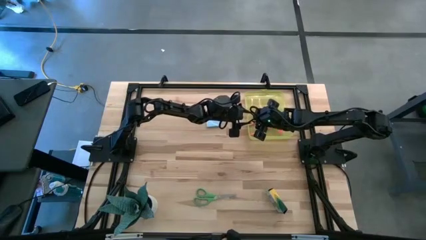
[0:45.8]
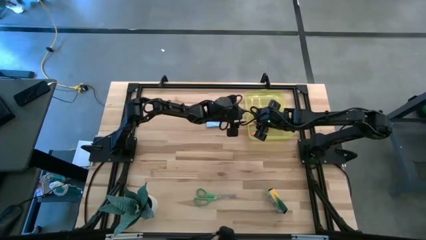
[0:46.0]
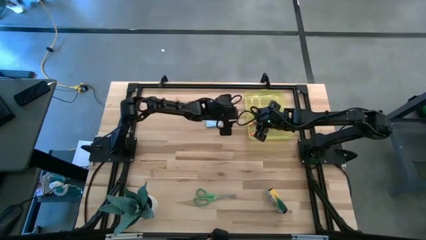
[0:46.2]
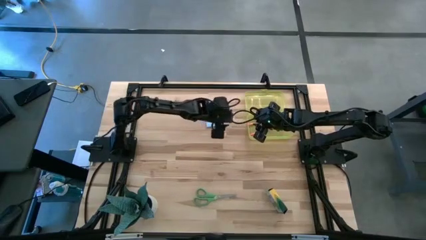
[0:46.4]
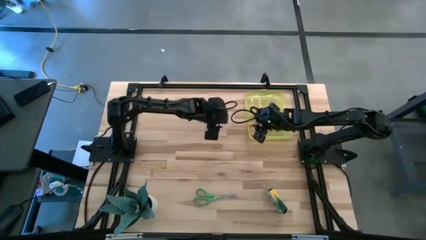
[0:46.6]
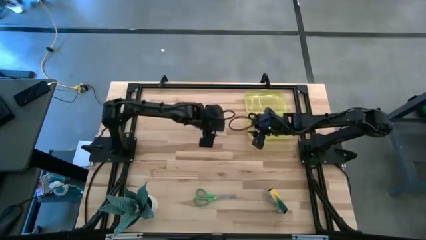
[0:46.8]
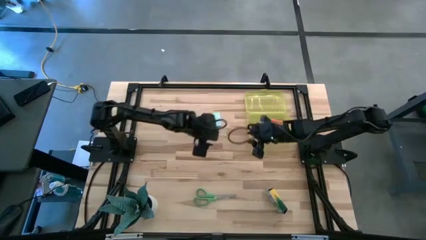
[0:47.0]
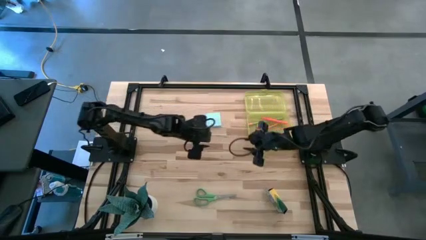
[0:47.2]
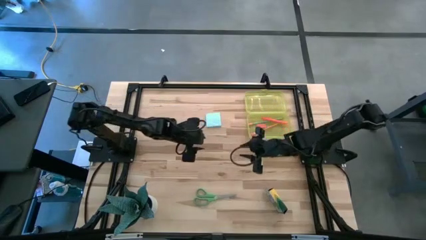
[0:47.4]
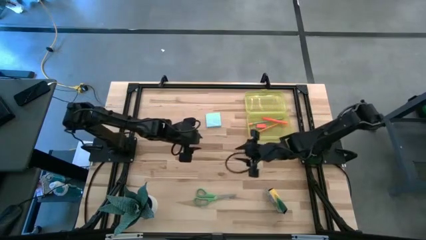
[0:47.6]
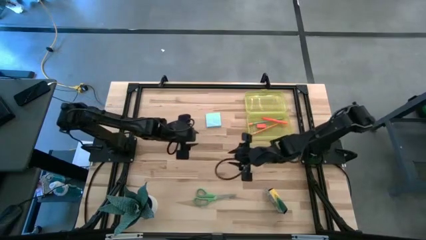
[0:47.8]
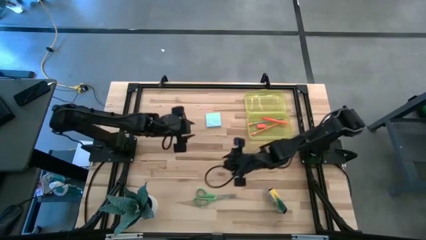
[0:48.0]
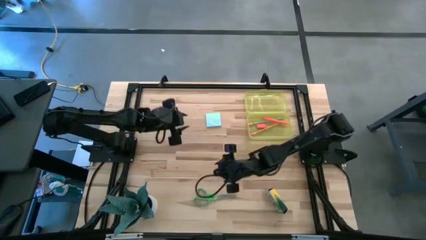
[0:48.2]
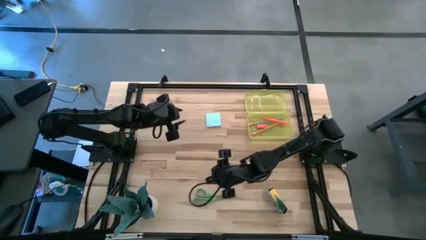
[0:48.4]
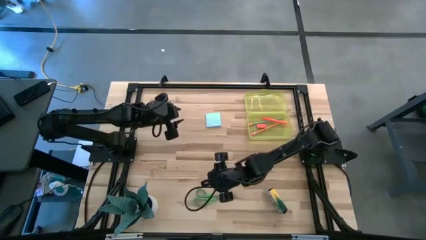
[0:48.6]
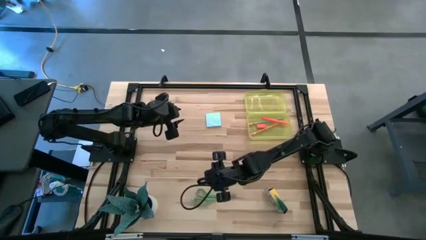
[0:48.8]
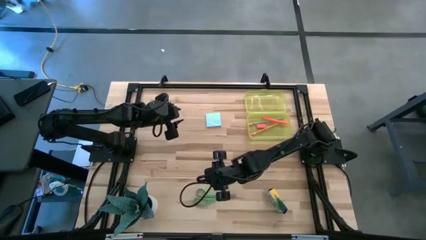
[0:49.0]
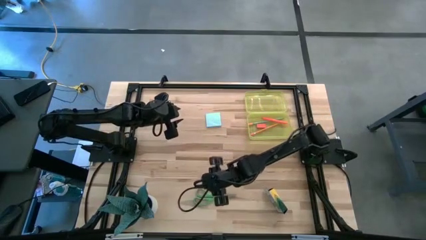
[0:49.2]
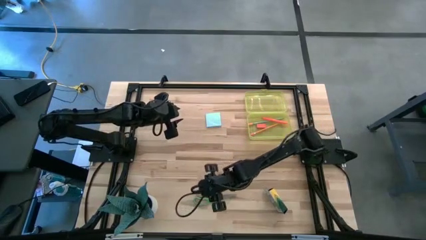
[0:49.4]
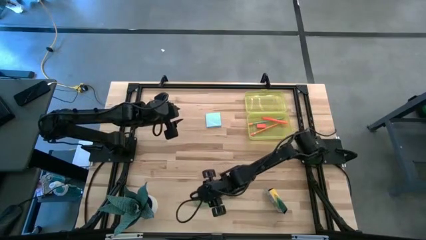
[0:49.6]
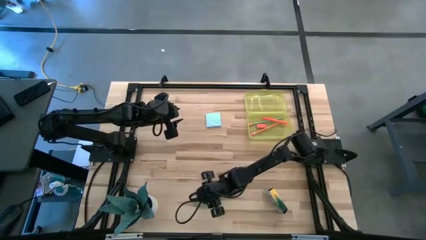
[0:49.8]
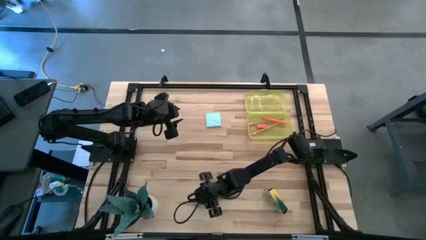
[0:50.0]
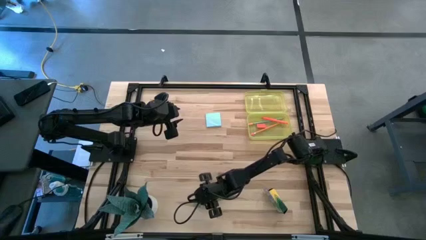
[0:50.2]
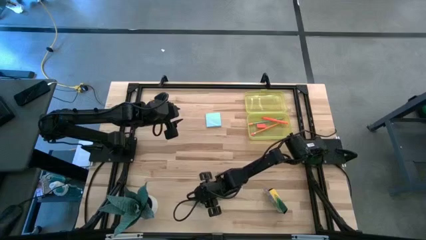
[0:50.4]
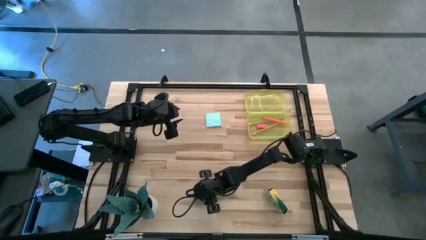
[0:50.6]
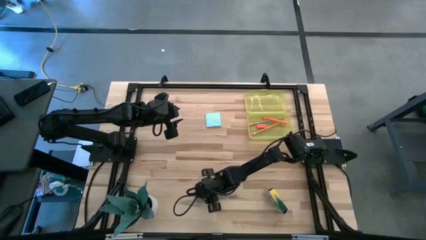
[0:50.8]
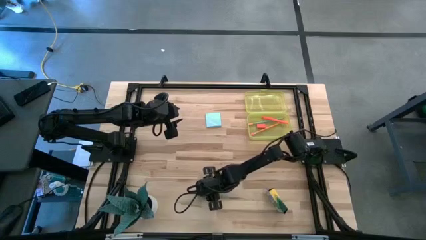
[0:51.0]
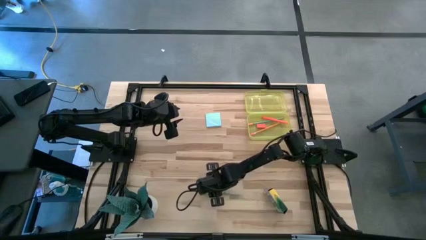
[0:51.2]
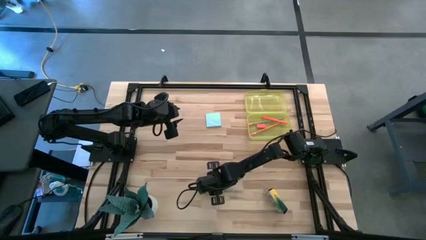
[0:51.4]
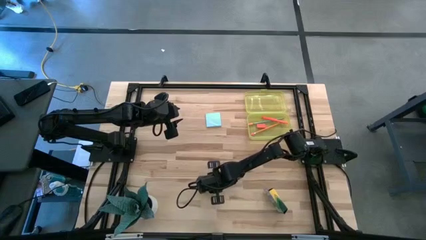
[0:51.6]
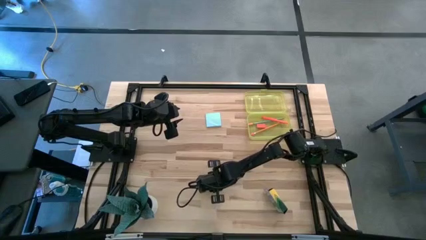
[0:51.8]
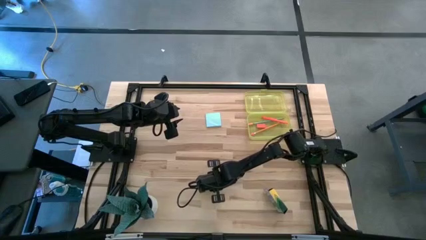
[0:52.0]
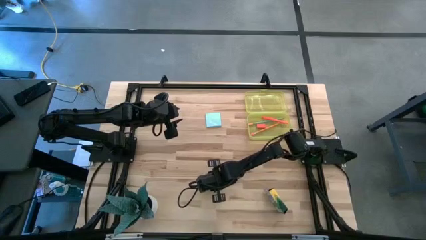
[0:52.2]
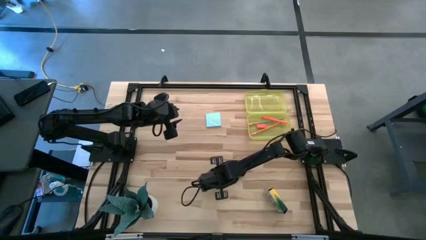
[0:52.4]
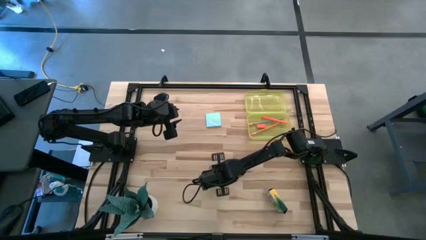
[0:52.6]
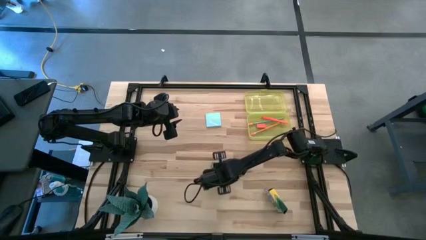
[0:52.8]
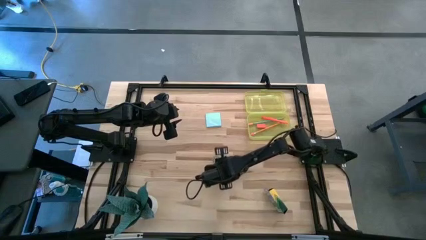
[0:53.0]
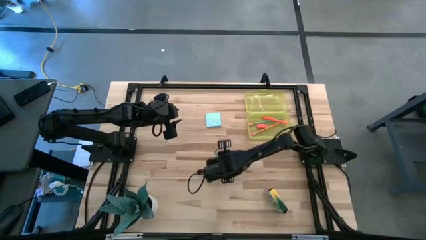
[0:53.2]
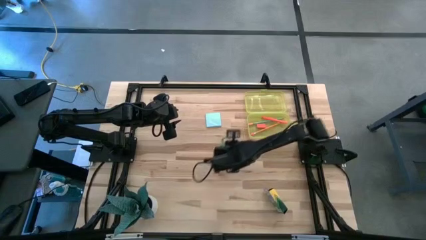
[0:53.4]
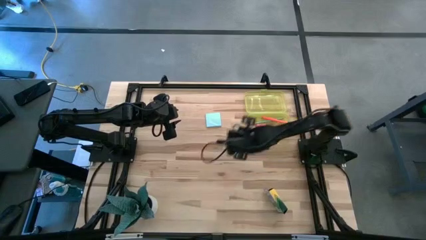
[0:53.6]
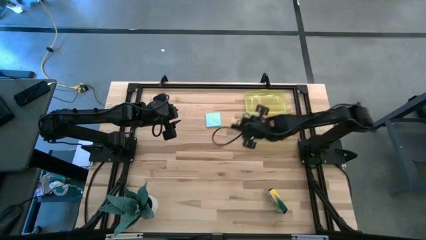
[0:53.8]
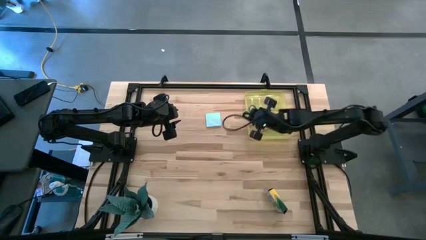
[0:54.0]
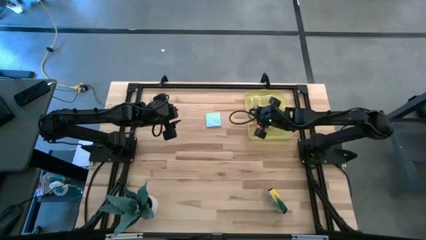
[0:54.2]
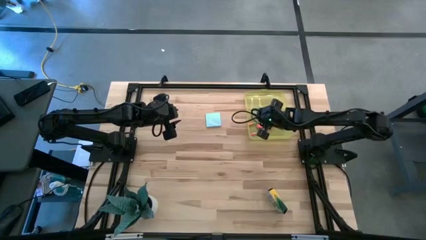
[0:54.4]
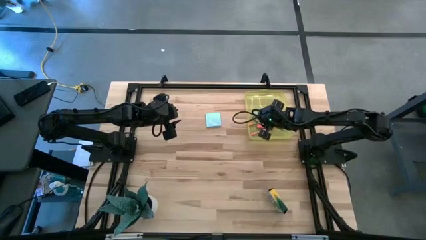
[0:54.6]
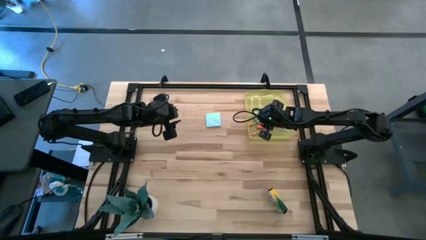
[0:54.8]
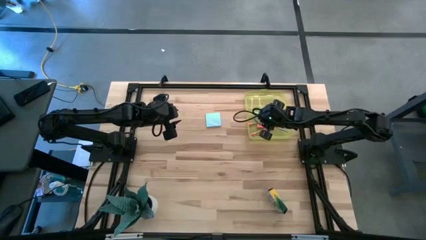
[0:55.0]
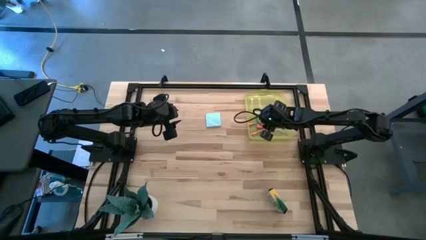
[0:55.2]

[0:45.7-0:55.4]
Task: Pack school essentials
Put the green scissors into the yellow storage box

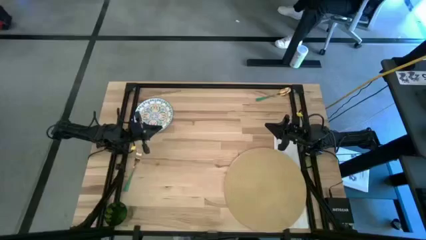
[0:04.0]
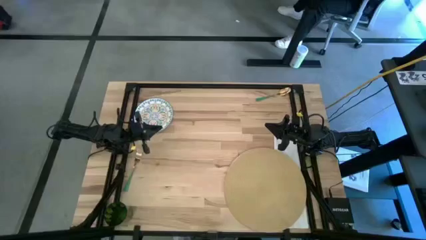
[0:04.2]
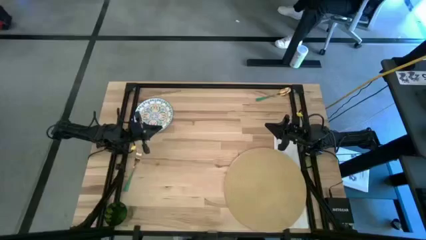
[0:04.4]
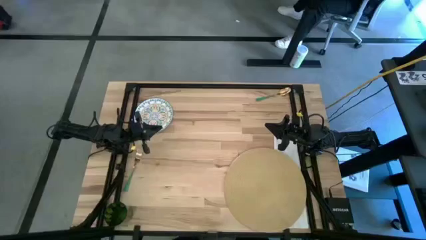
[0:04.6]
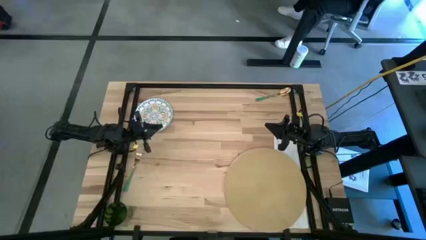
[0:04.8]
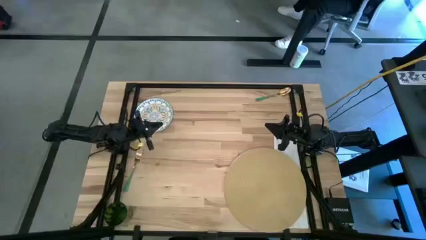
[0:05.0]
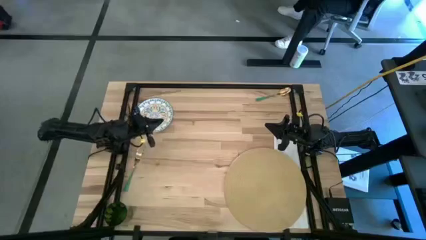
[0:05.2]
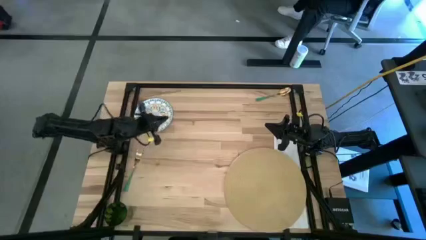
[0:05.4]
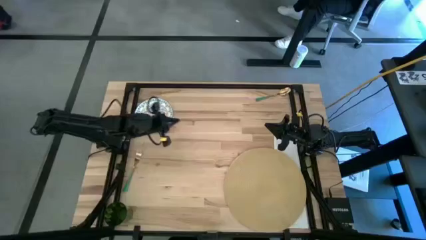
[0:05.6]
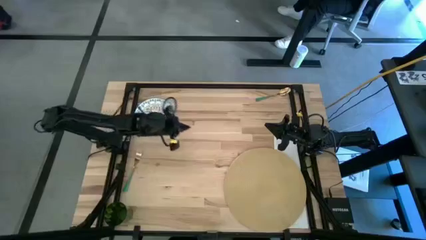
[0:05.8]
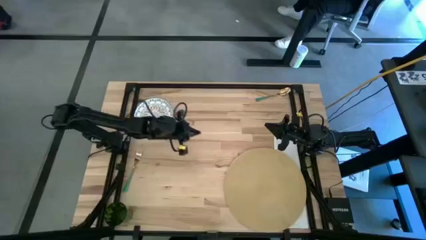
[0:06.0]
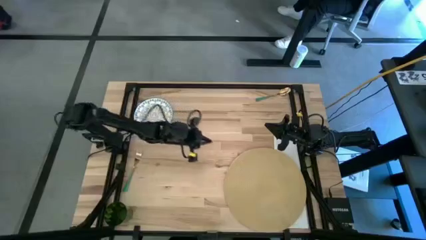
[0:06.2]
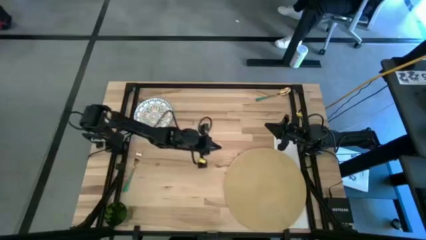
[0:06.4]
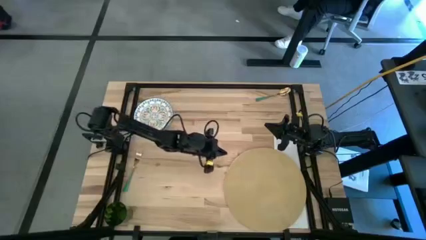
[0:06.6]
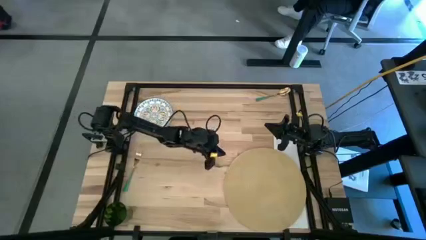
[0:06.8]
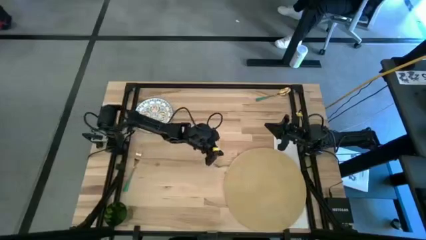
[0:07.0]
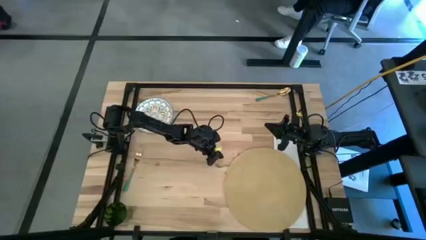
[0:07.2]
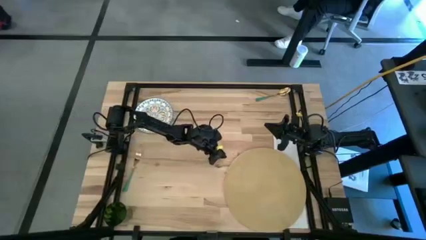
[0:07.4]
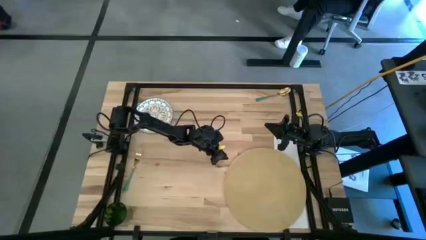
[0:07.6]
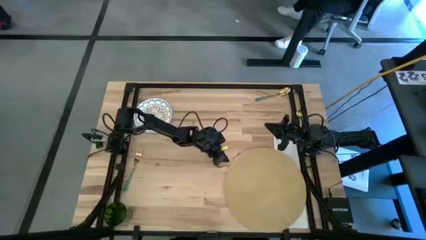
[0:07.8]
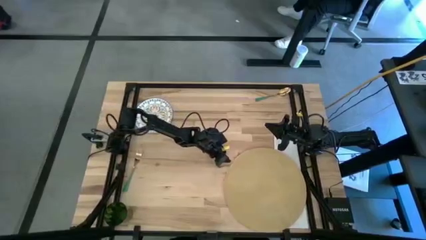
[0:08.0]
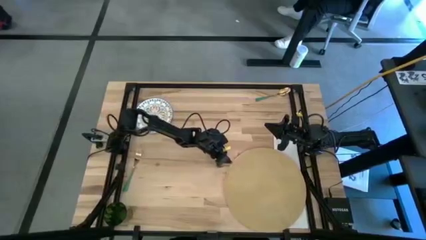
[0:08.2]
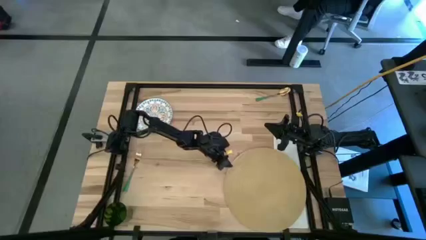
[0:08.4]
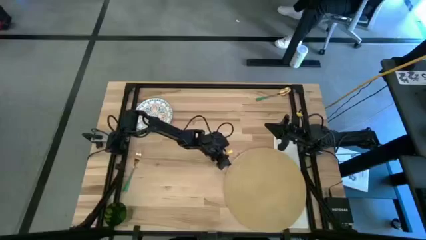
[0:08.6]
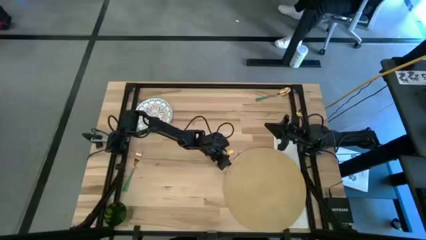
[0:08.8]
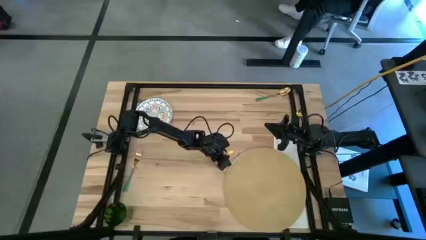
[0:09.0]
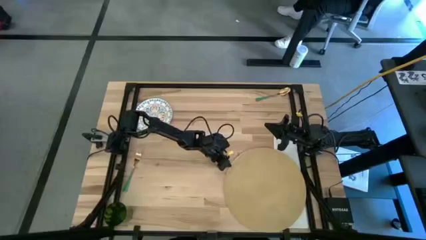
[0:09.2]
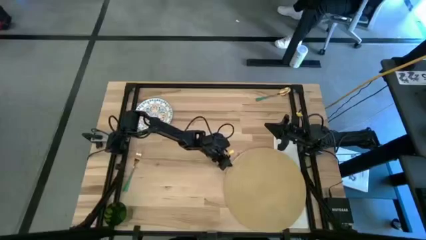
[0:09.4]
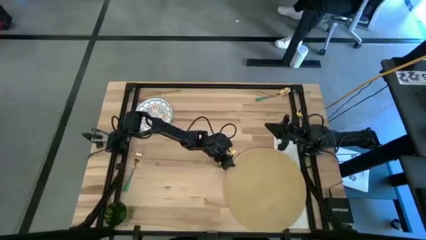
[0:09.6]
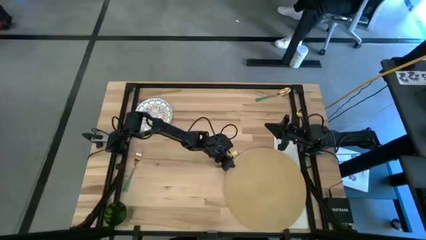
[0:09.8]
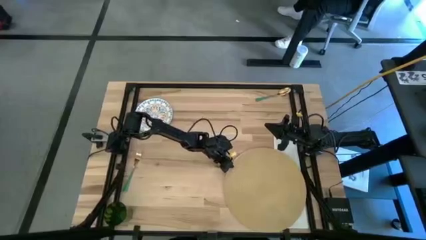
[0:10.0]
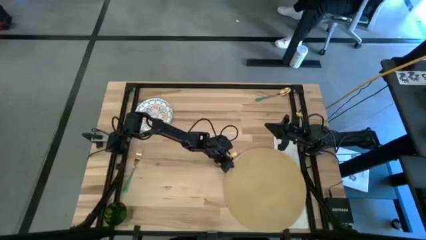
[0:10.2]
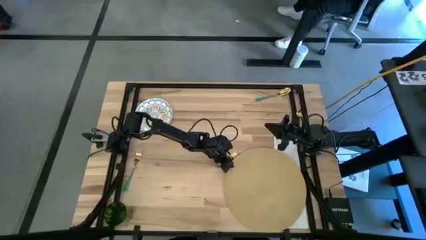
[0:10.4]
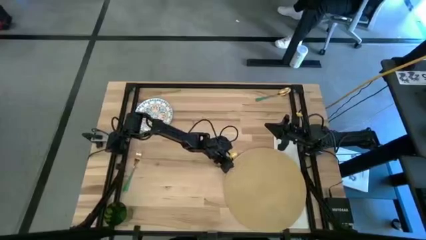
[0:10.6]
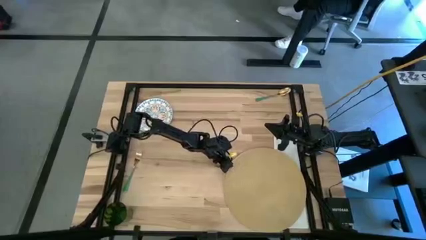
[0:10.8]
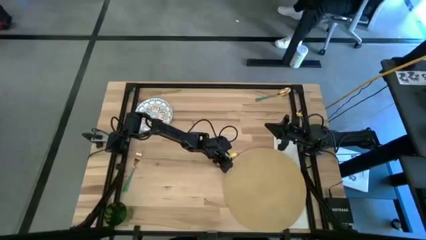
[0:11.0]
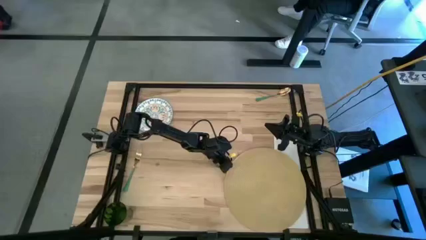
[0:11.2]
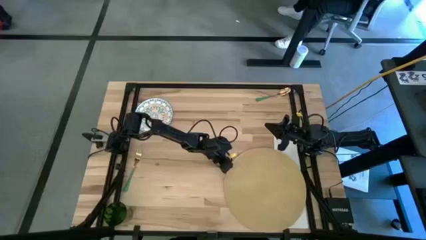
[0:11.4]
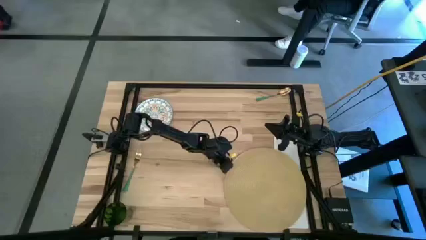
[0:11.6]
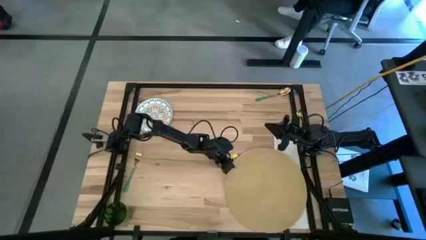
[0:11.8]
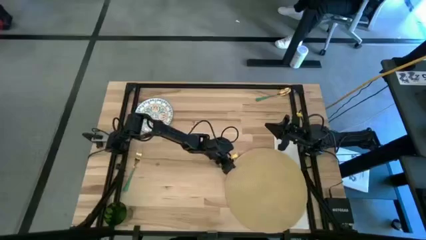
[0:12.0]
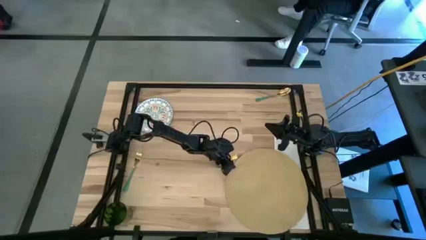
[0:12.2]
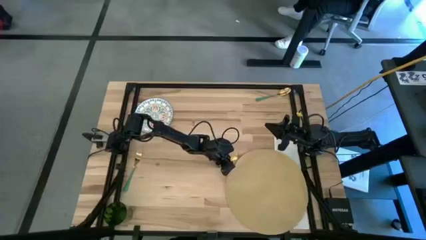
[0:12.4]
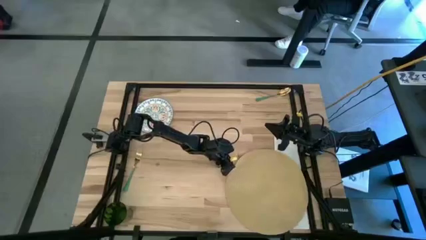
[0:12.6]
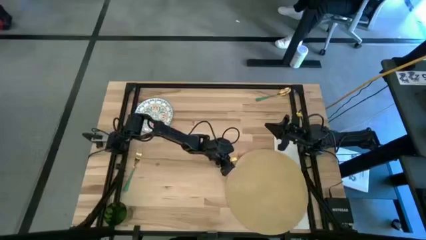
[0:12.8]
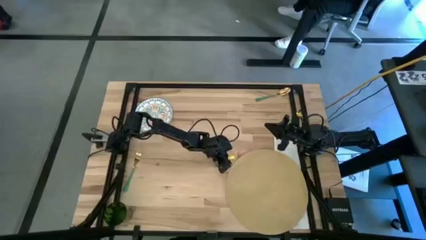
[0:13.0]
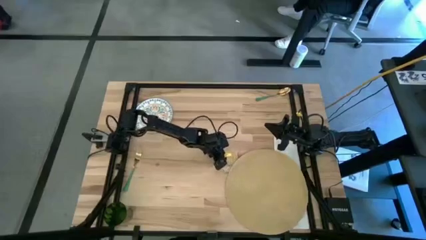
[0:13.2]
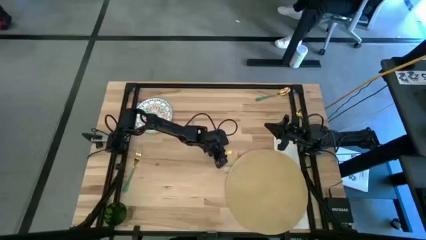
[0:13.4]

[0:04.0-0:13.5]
Task: Set table place
Move the brown place mat to the center of the table
